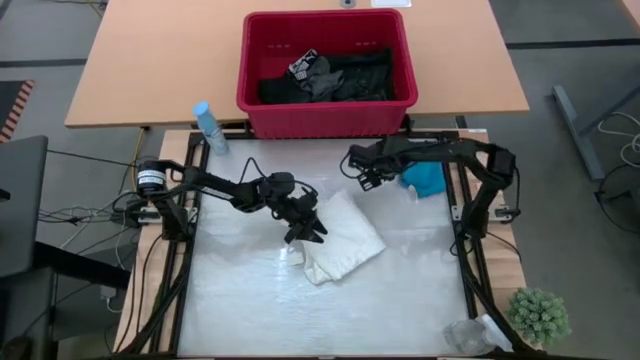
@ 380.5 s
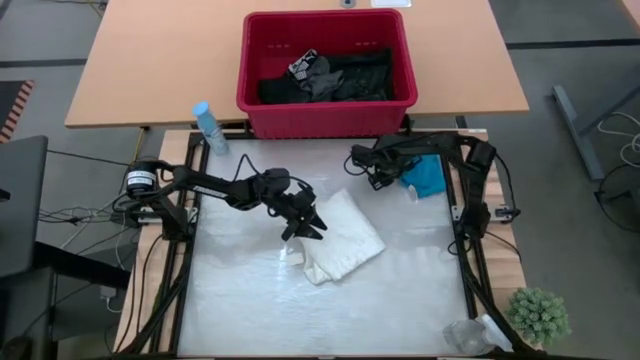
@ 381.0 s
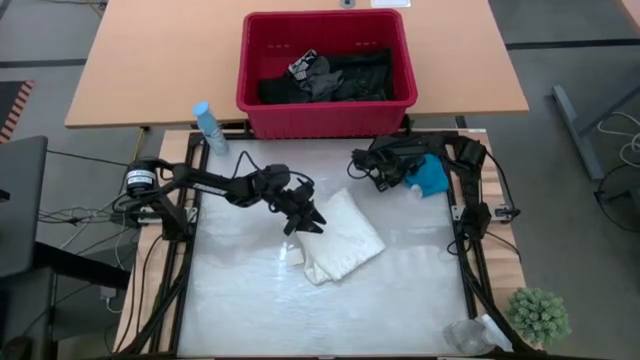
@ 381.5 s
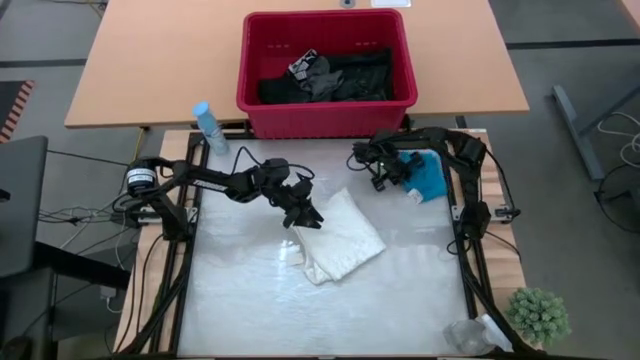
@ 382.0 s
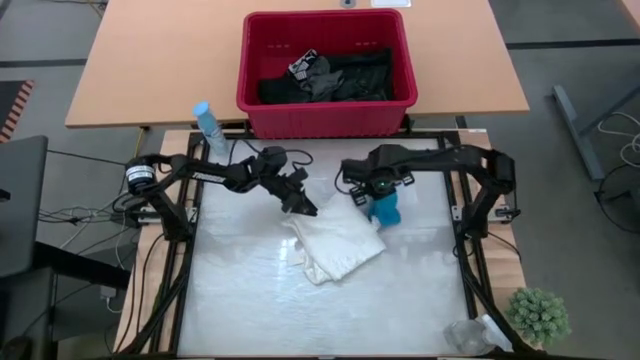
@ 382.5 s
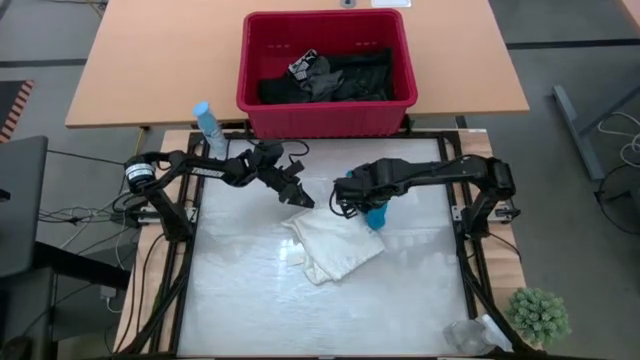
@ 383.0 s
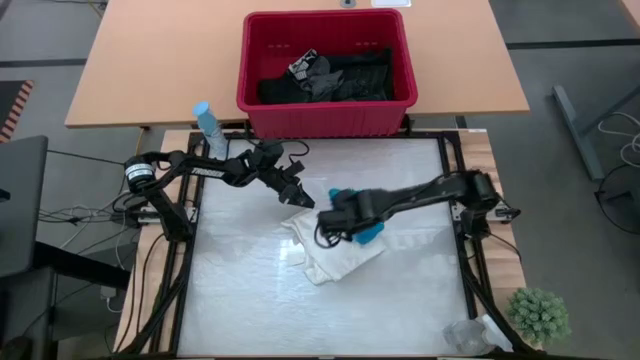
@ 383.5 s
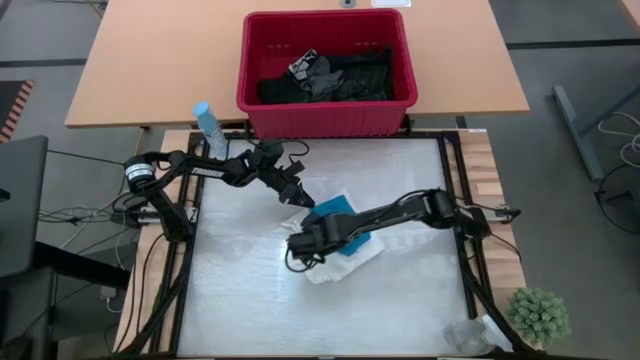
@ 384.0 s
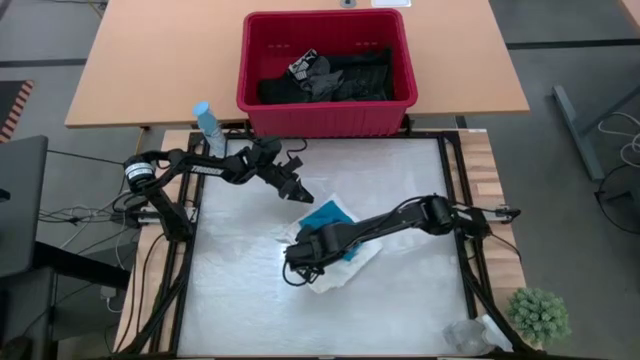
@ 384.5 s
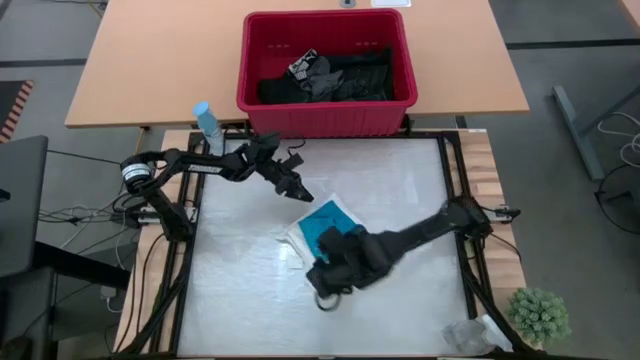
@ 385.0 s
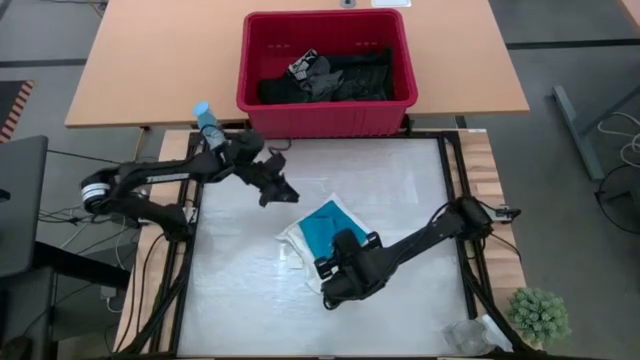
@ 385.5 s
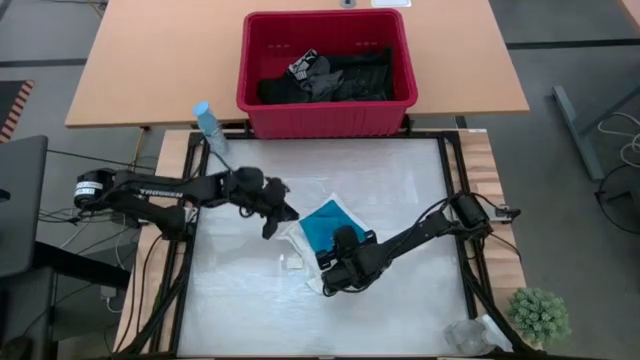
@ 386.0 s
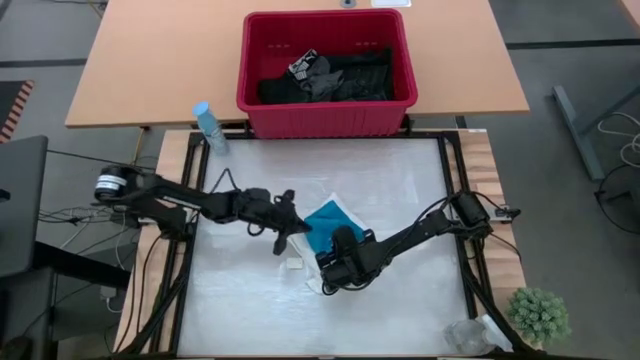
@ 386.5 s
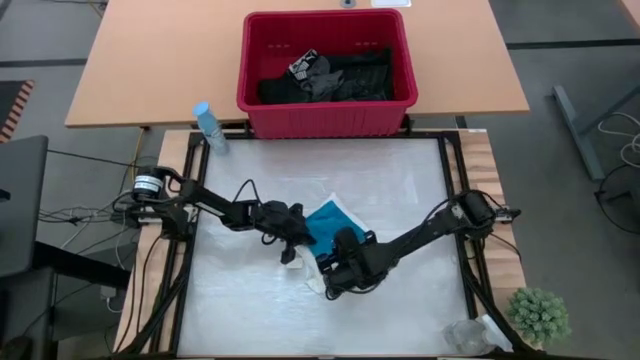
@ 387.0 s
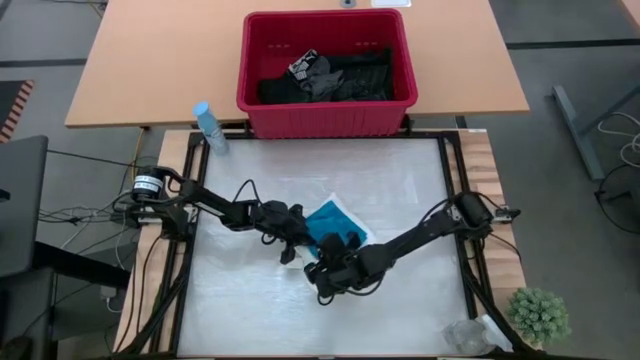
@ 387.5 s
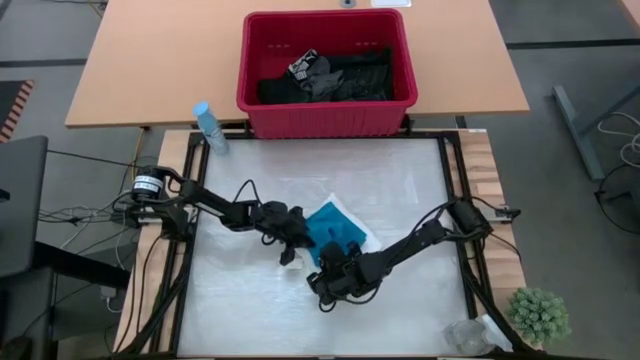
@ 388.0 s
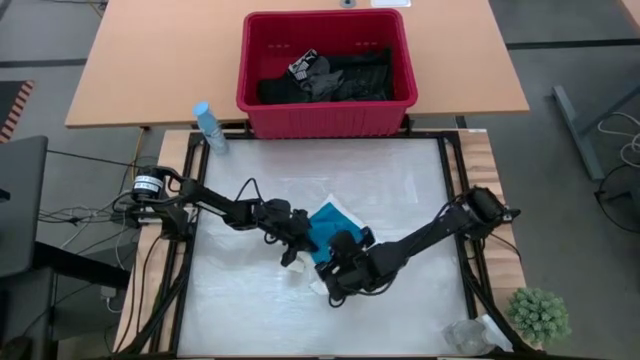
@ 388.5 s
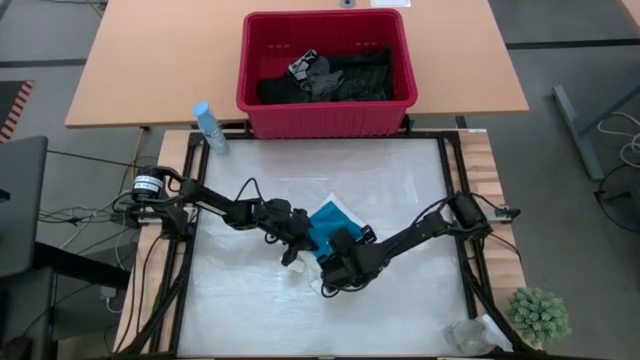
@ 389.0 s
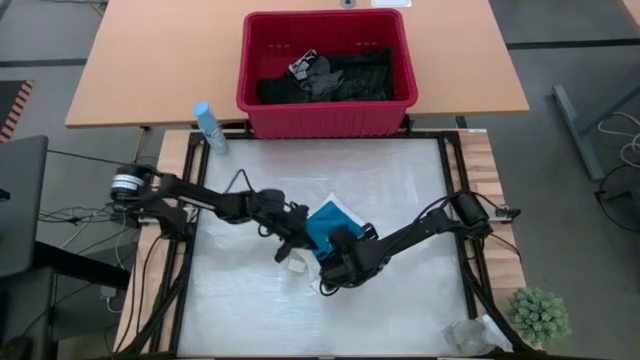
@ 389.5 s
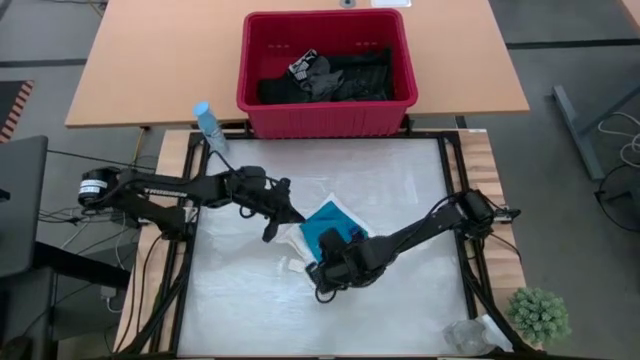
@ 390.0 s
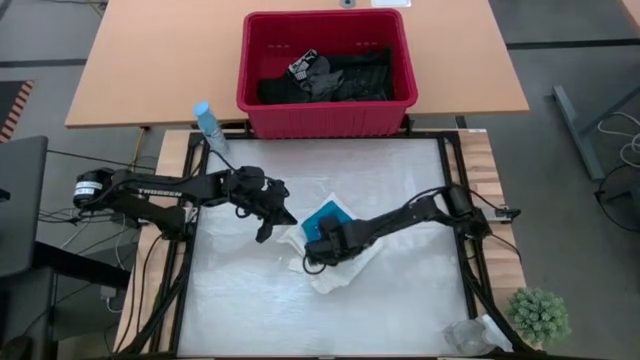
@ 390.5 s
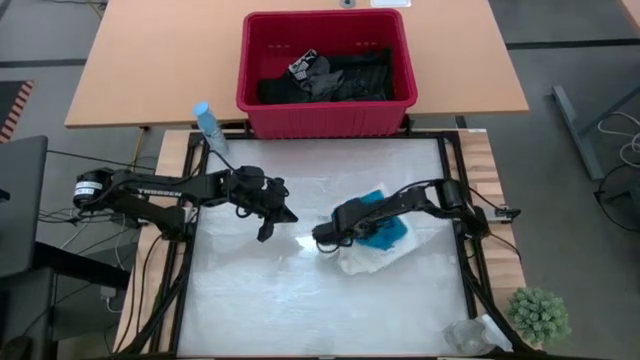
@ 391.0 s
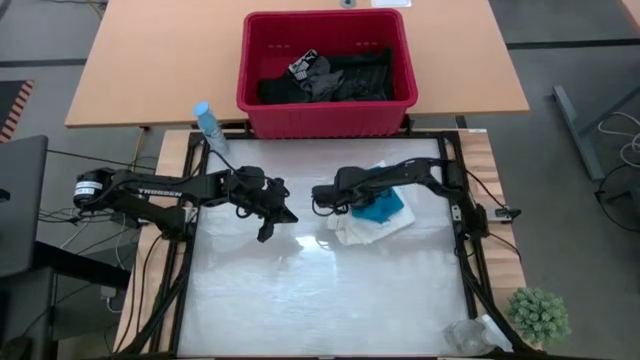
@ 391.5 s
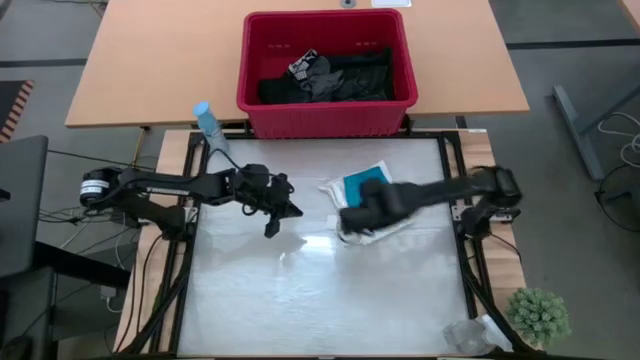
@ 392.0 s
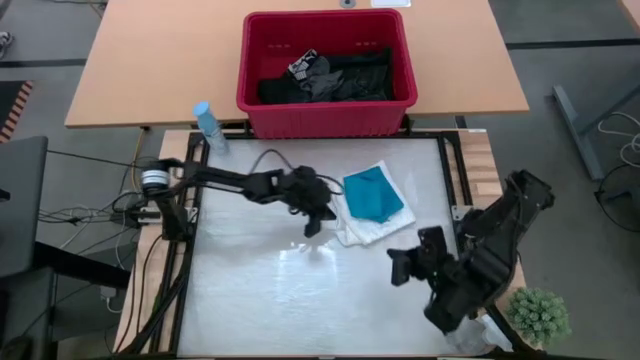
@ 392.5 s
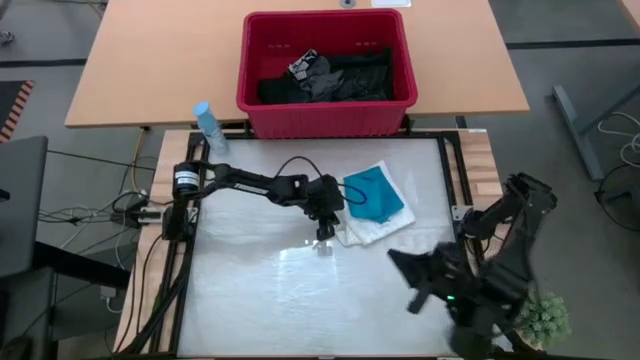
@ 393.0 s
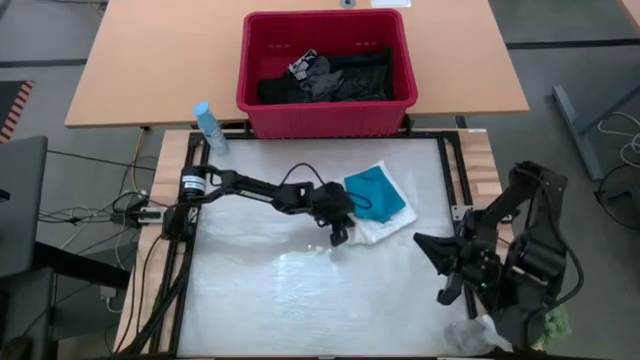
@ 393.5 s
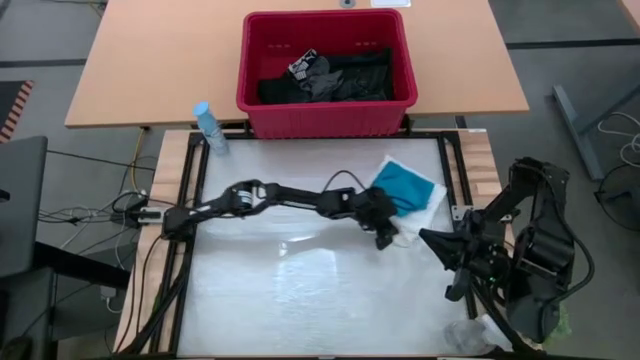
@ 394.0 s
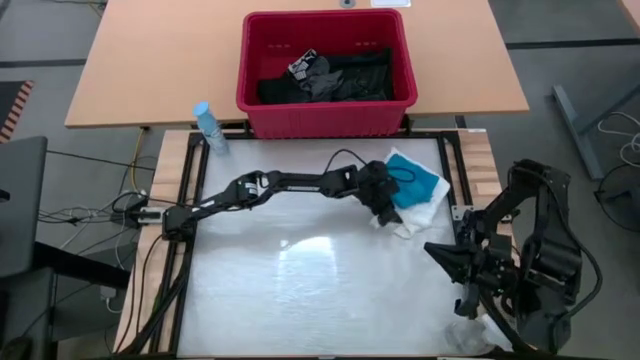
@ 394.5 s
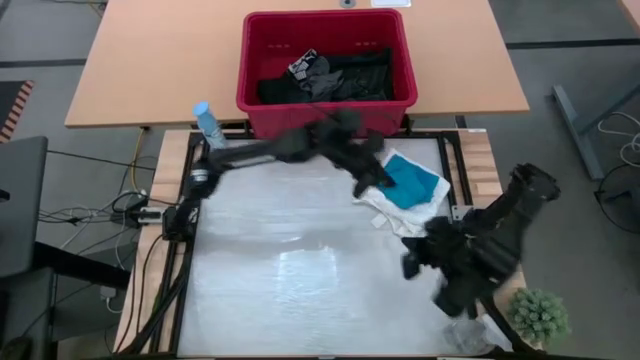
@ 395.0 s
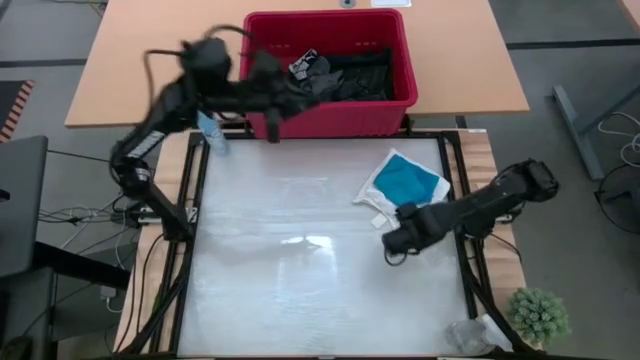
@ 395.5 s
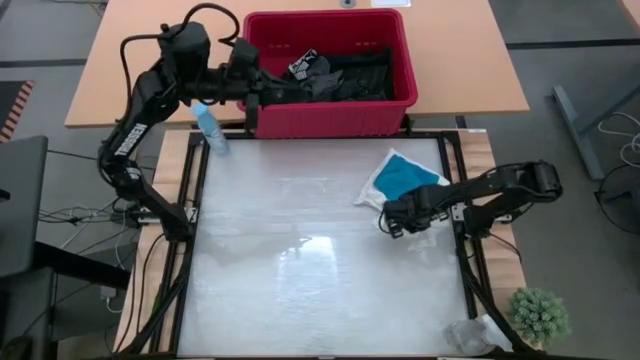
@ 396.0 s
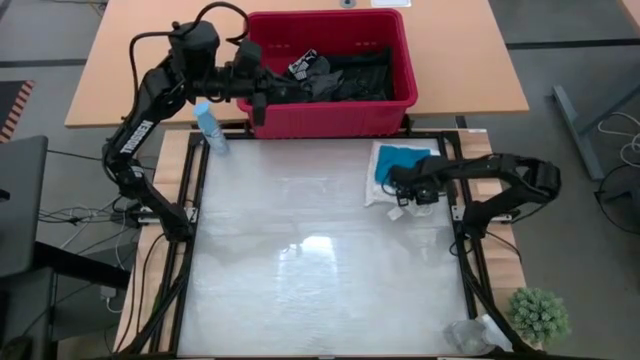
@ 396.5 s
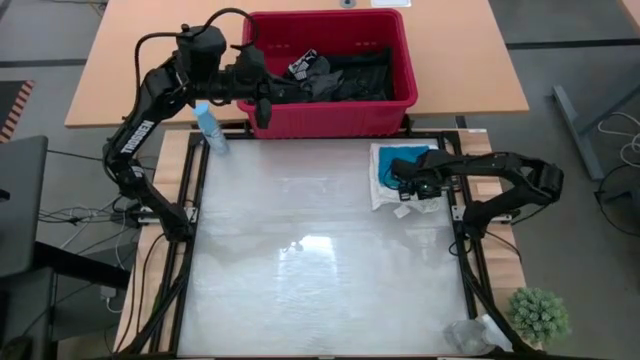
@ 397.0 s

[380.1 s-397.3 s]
Task: Fold laundry
Stack the blue shorts on the white shirt

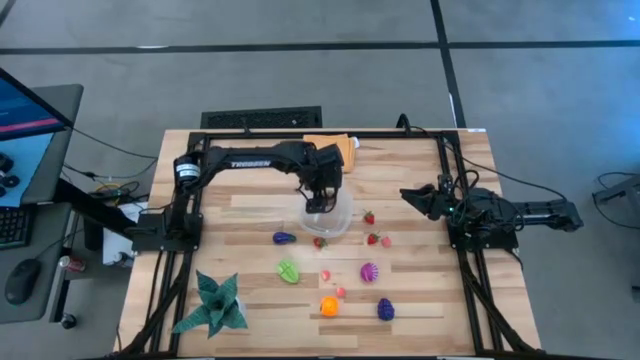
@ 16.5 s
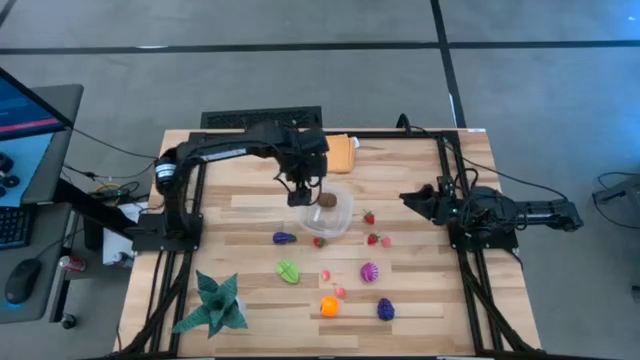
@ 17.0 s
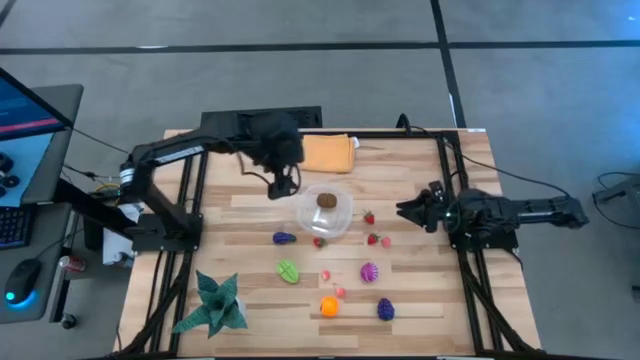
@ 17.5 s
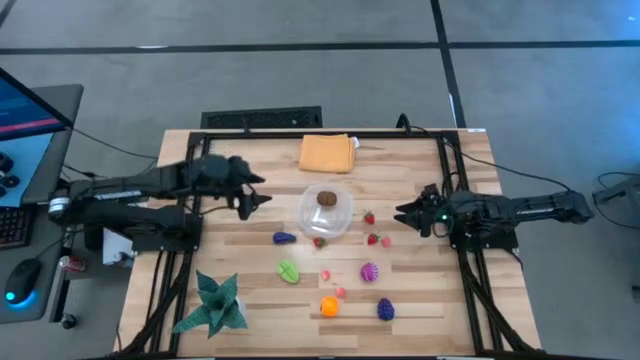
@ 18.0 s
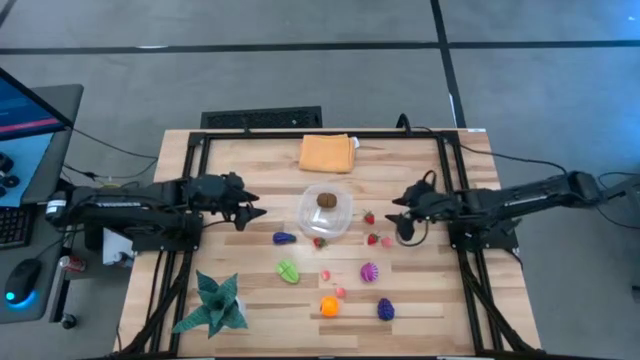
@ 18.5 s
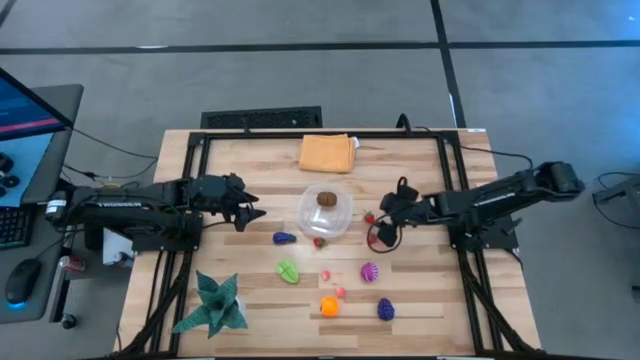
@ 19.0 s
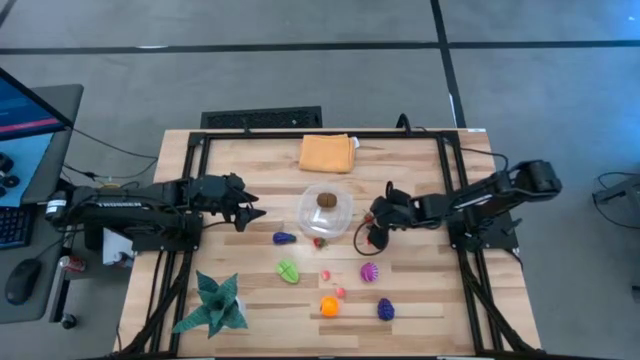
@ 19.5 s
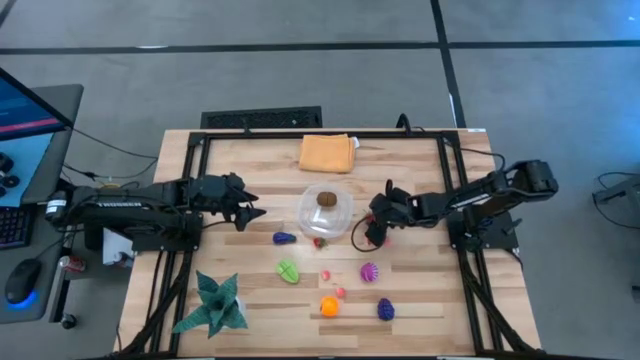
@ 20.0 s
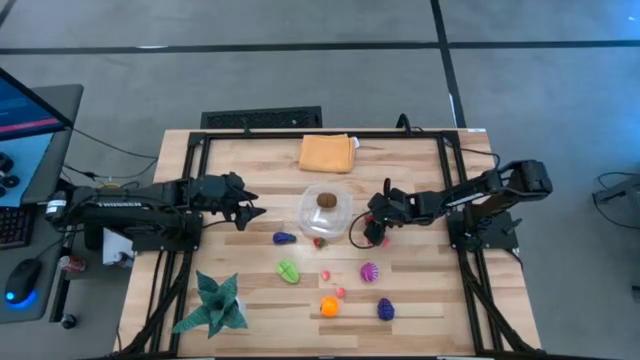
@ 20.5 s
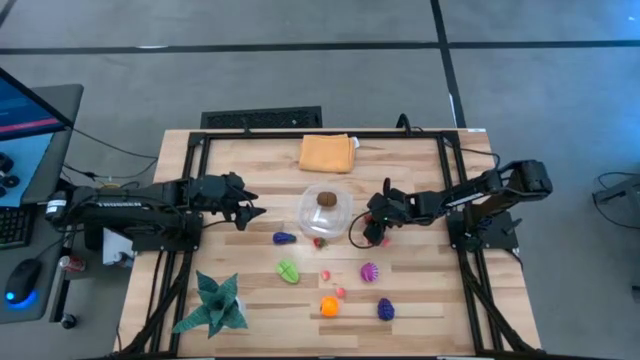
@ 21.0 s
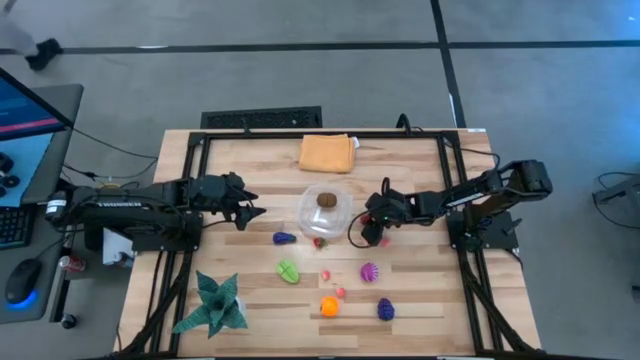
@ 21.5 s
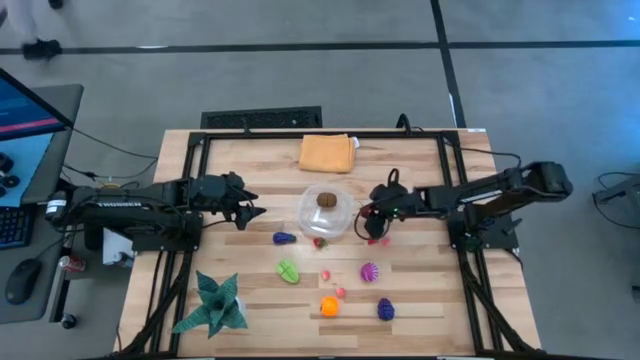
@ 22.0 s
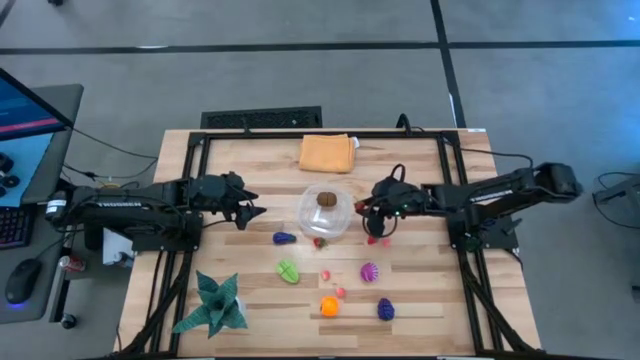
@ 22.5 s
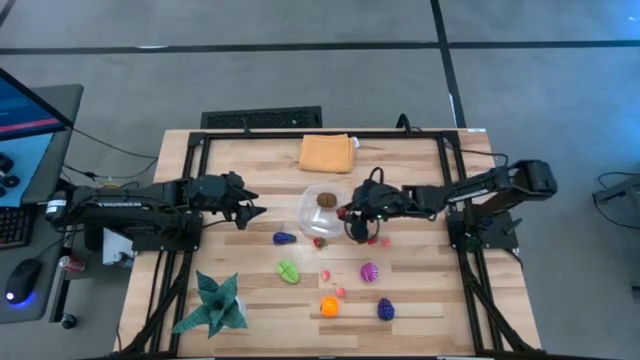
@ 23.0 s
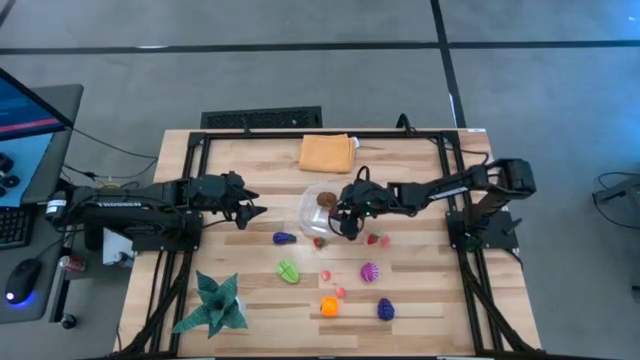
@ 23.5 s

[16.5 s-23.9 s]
Task: Pick and placing Produce into tupperware
Put the top red strawberry into the transparent container
